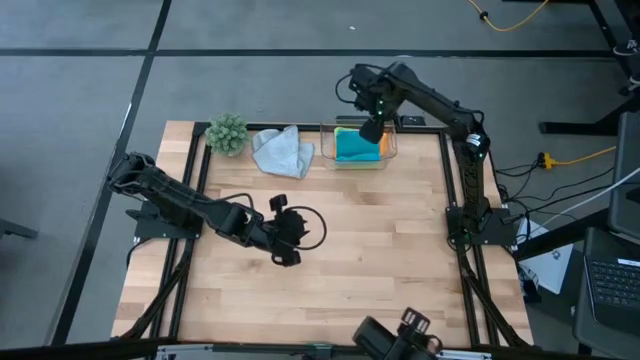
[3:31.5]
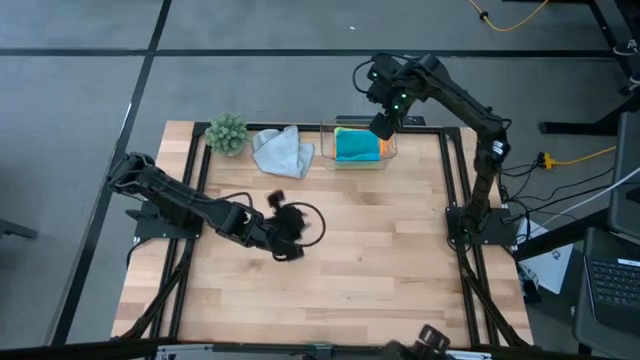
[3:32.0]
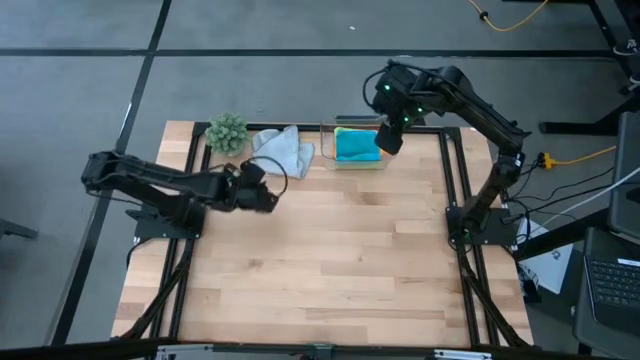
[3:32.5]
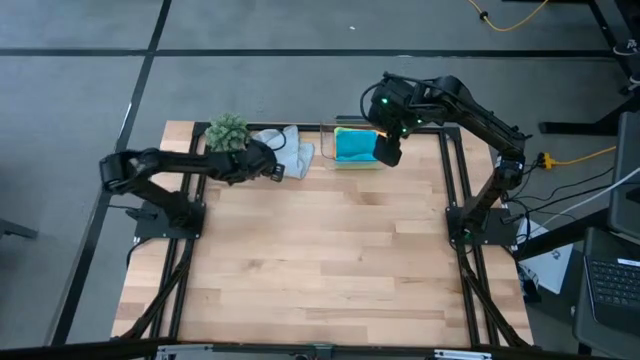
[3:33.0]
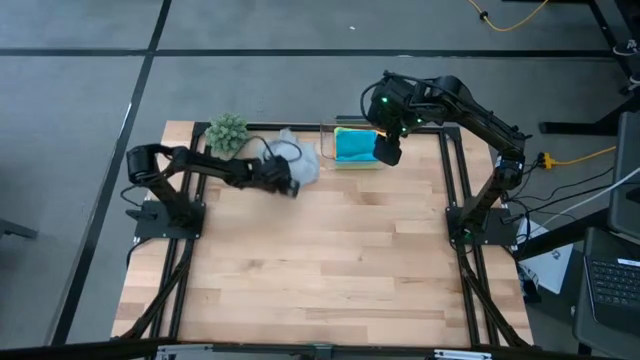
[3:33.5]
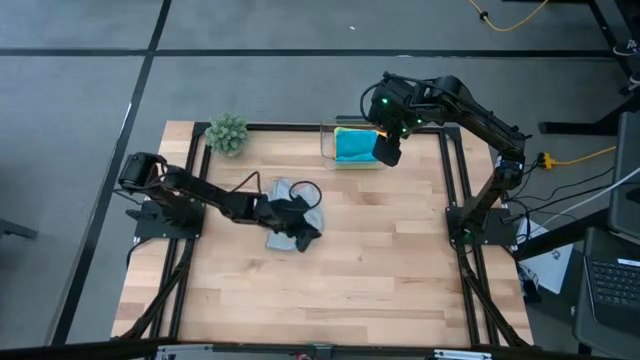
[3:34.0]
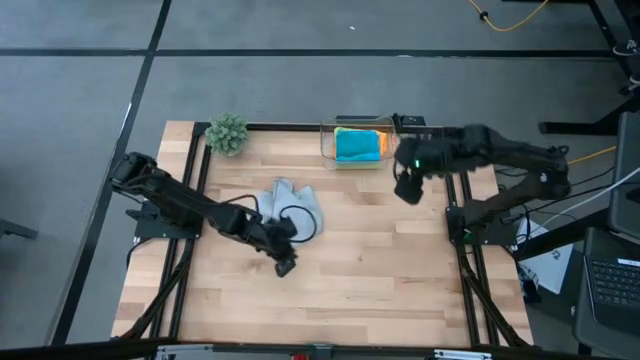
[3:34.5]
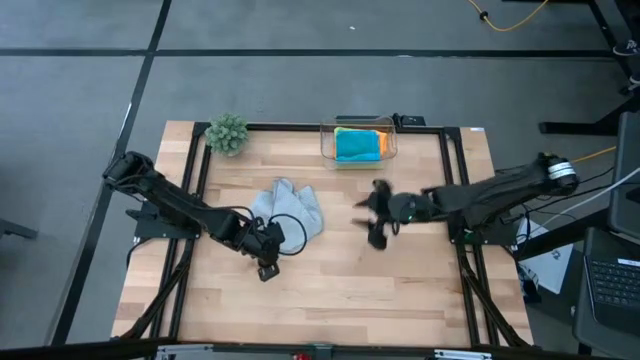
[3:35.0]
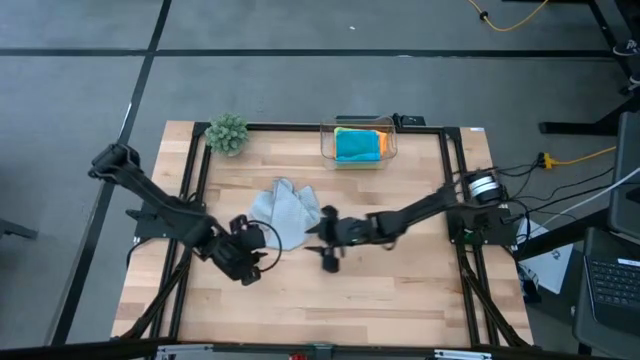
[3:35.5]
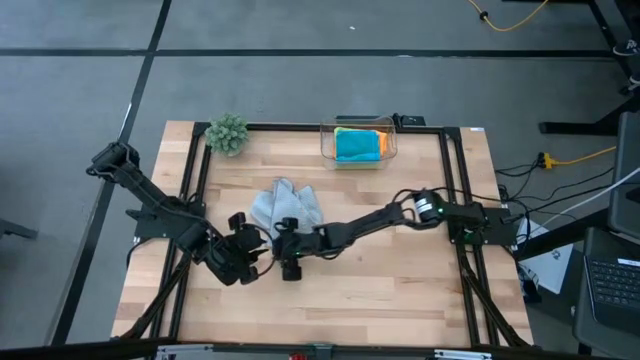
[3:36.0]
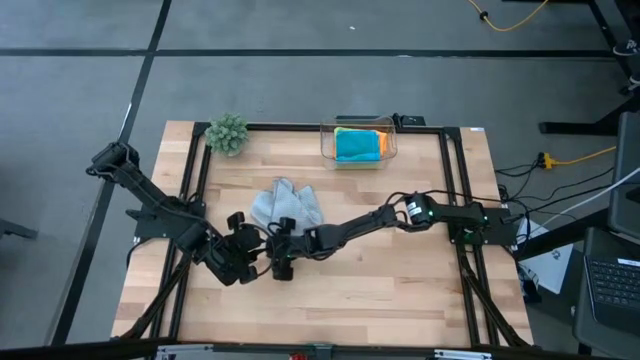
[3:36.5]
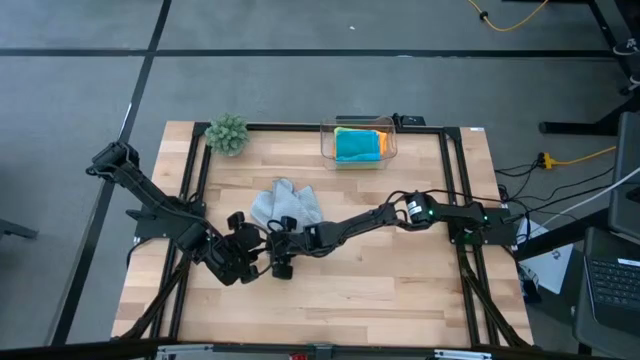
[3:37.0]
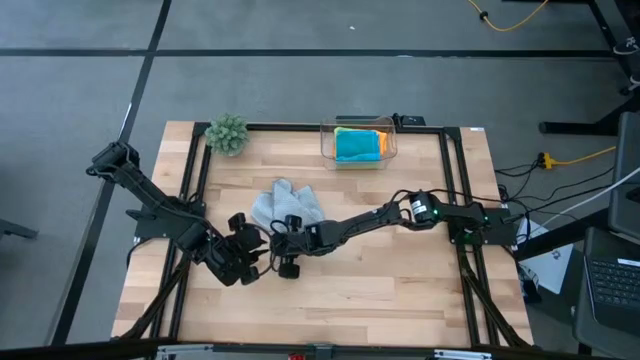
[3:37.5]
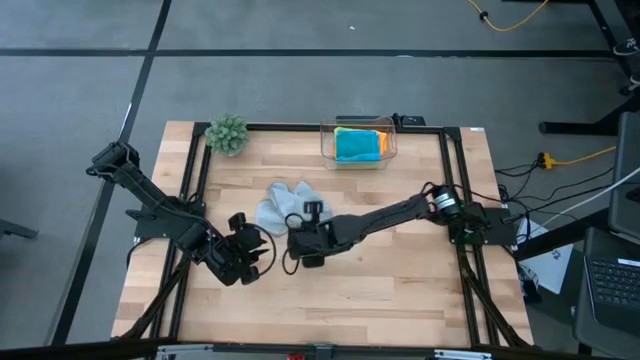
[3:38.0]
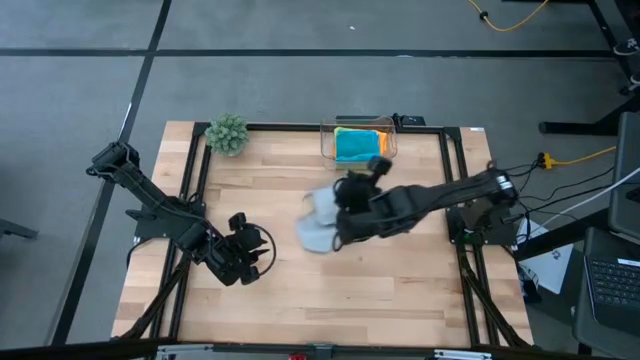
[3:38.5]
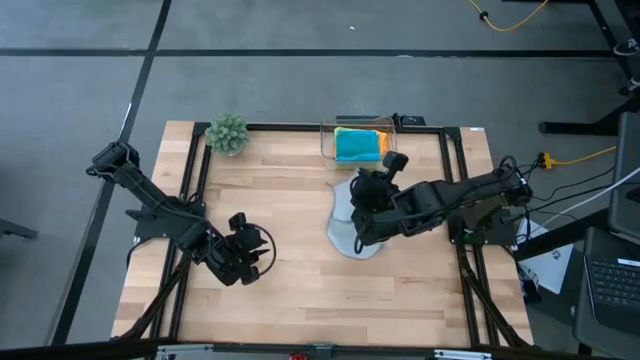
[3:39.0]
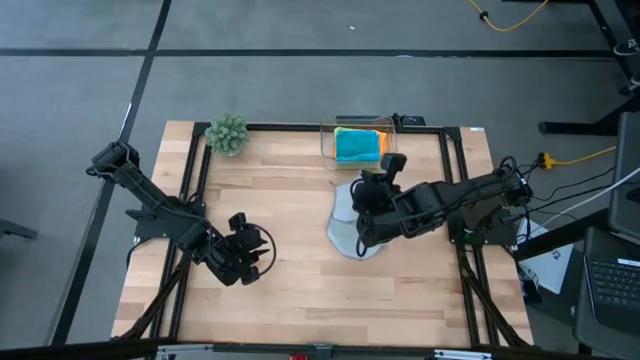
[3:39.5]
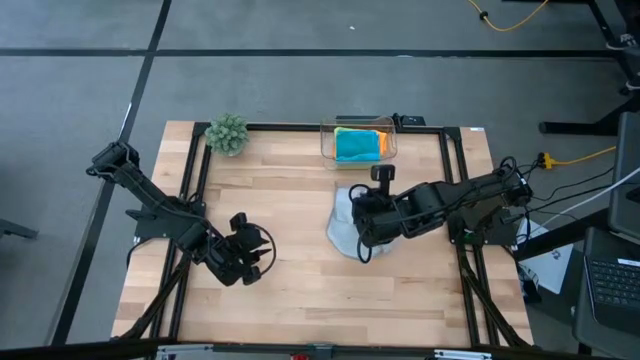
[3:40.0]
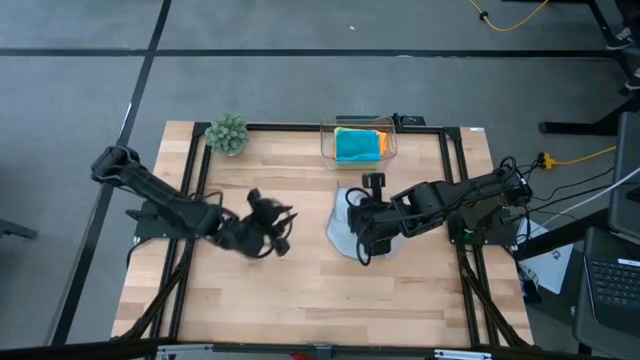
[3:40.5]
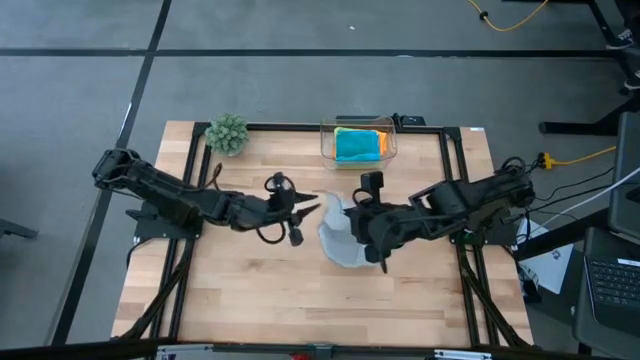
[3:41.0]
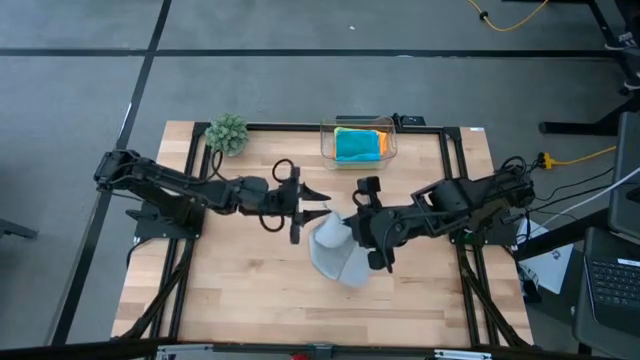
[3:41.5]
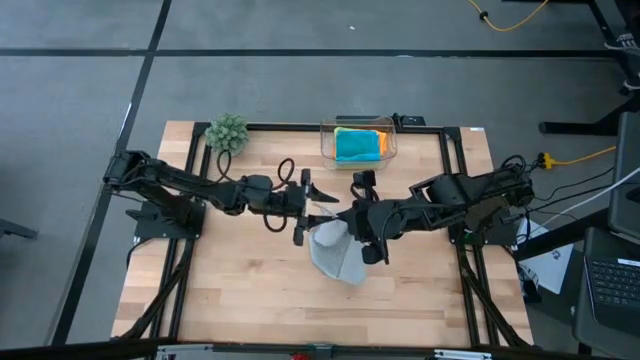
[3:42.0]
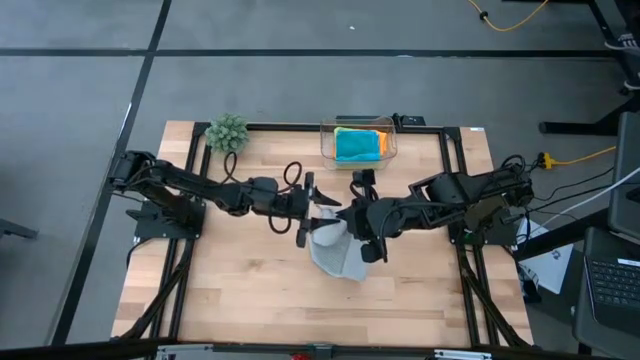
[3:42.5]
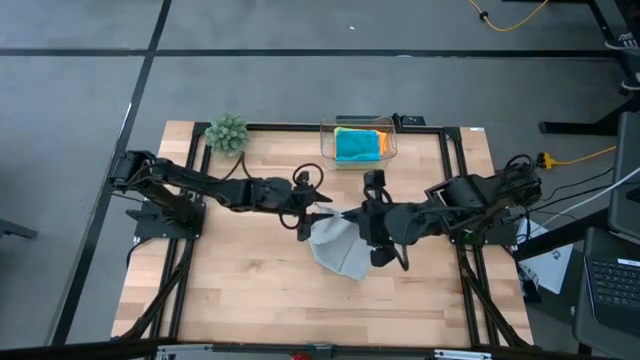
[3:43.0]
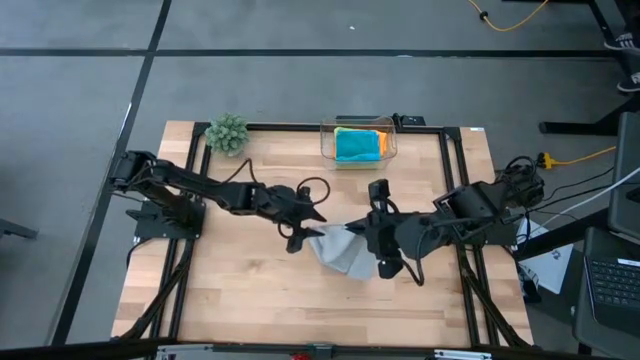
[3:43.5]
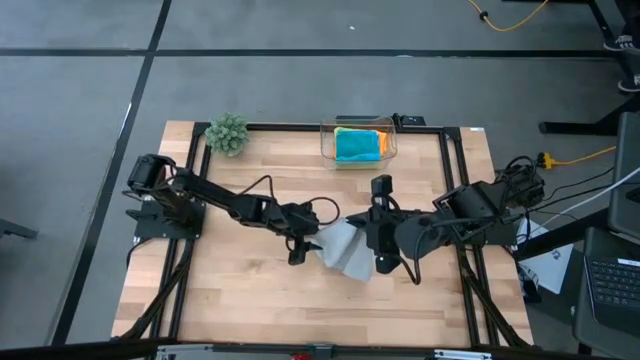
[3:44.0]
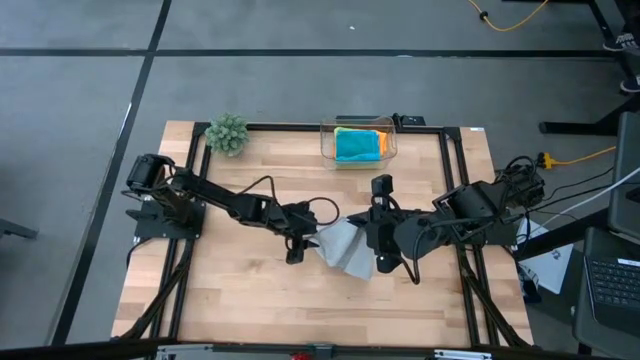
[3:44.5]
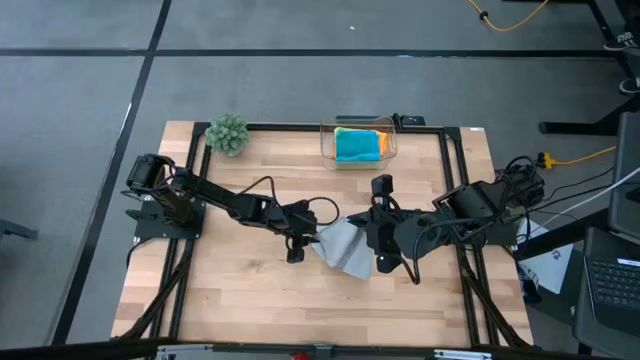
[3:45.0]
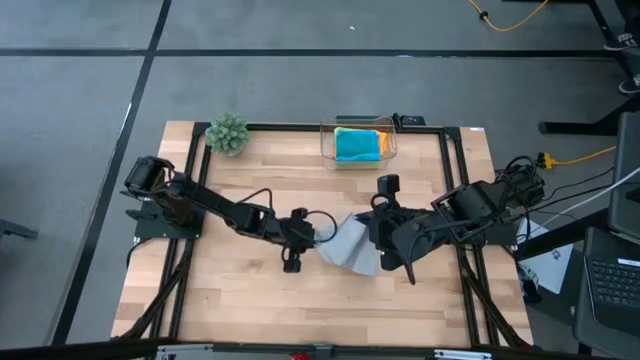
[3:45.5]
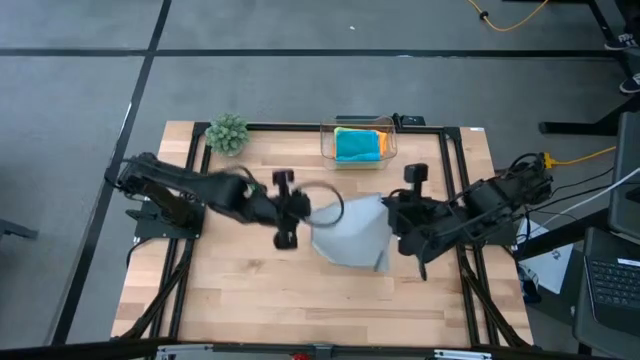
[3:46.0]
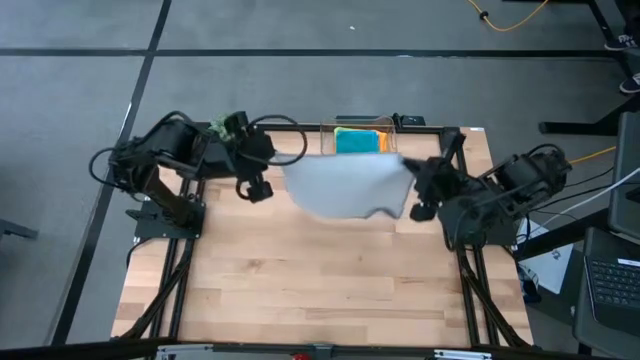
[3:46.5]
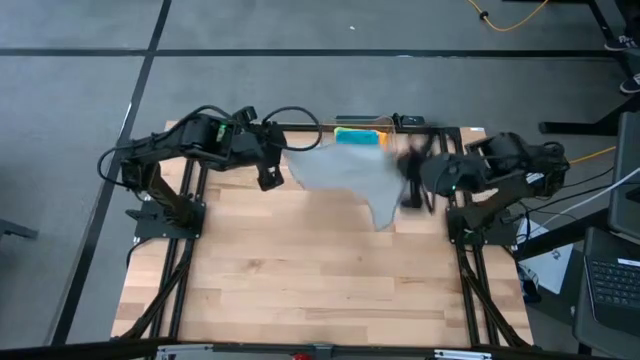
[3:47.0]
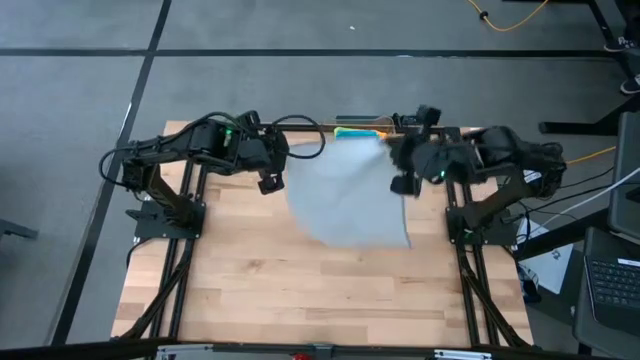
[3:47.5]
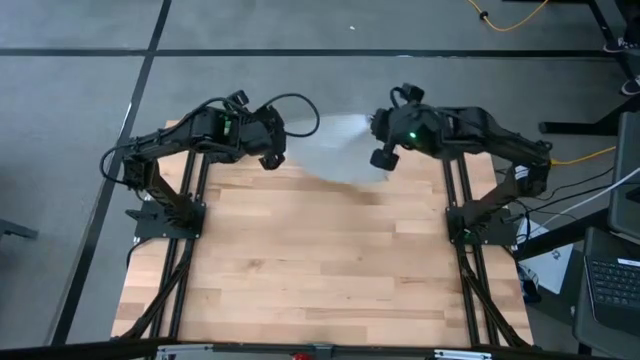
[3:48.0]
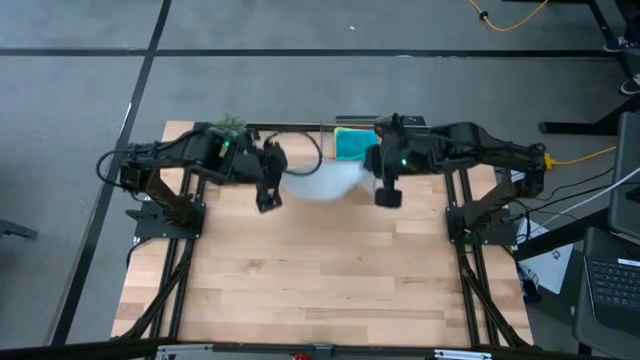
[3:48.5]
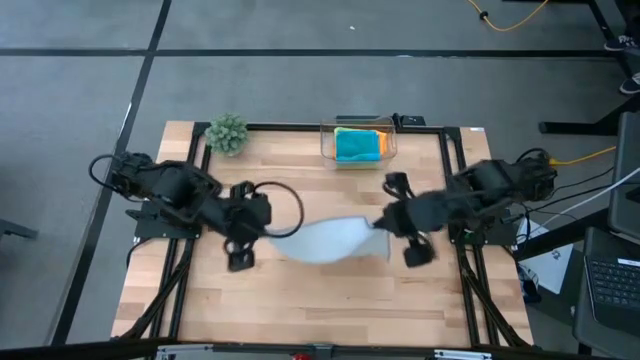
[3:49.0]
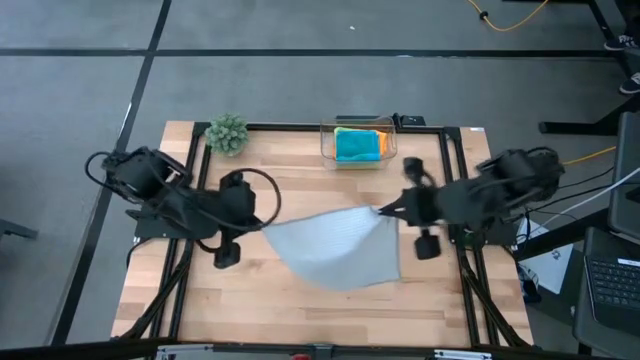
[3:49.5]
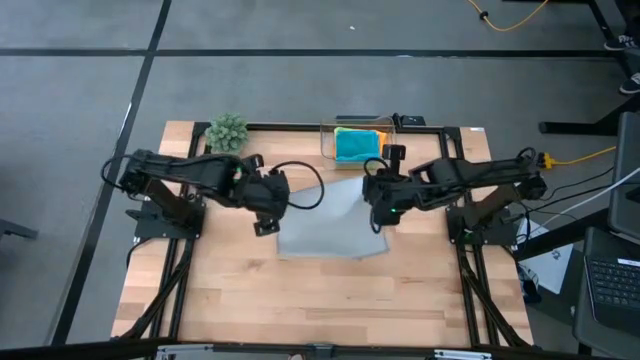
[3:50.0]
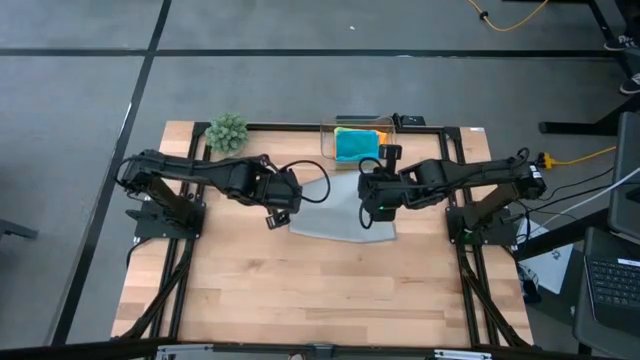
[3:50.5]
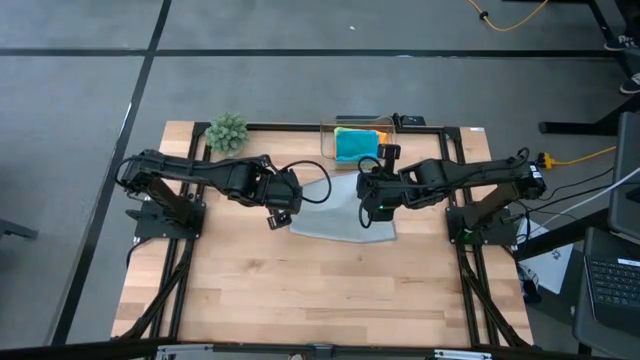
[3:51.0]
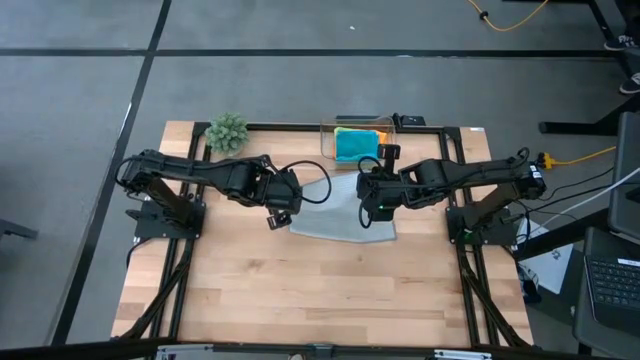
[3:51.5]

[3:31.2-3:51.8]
Task: Fold microfiber towels
Fold the gray microfiber cloth

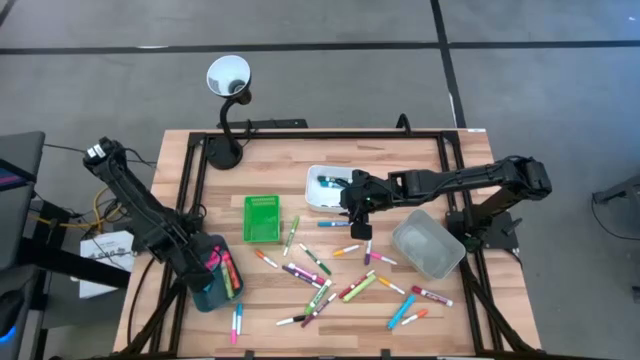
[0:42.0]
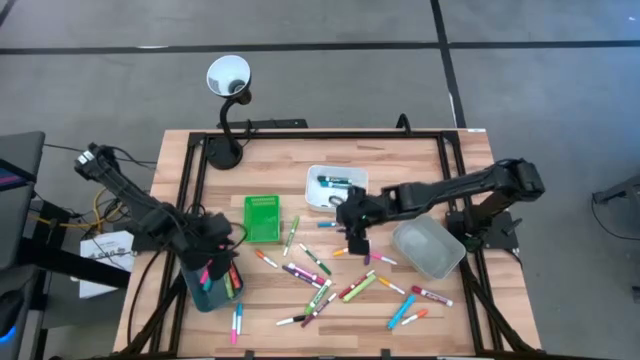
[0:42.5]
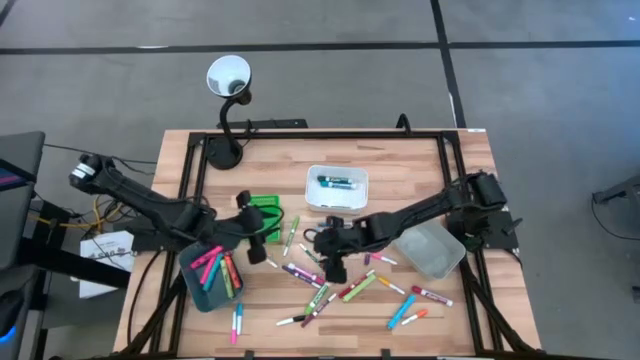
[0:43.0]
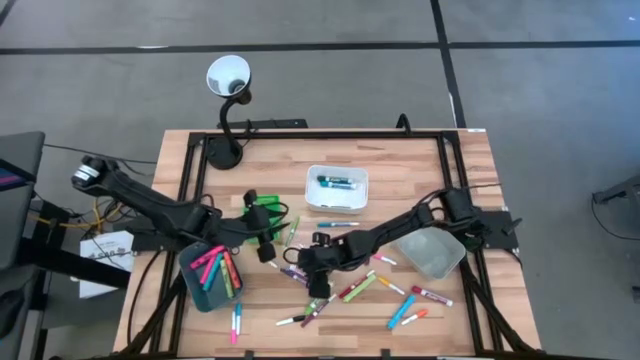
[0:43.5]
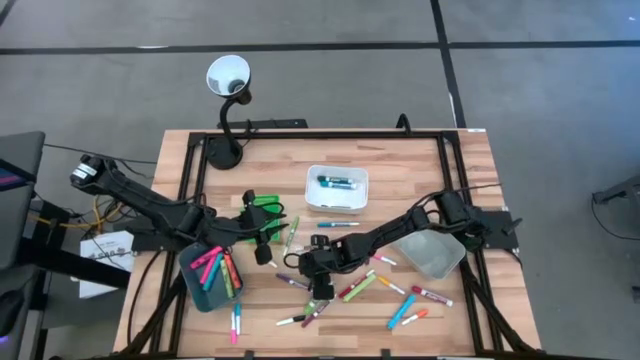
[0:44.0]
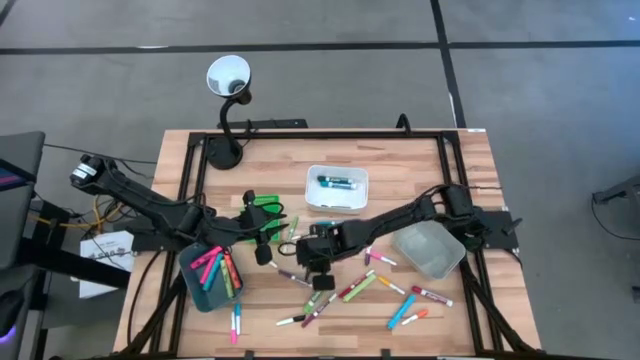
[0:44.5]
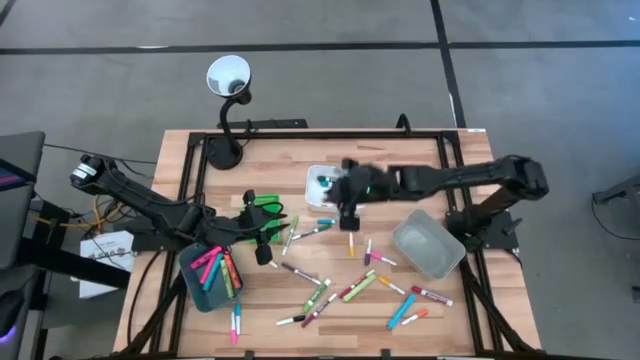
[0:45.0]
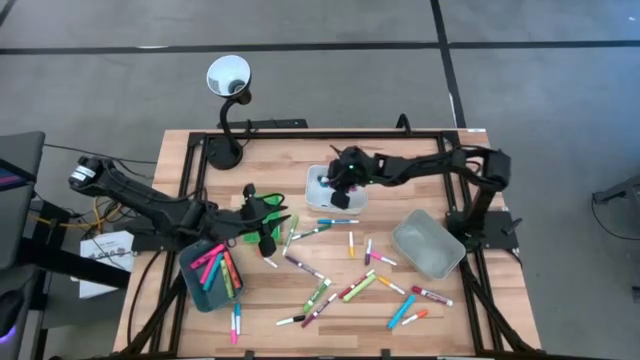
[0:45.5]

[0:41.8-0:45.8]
Task: Pick & Place Markers
Put the big pink marker pen into the white bin
